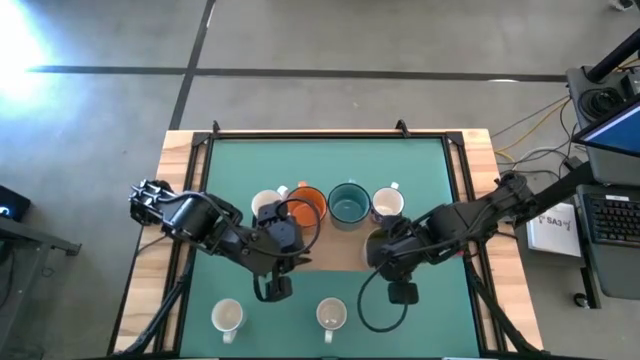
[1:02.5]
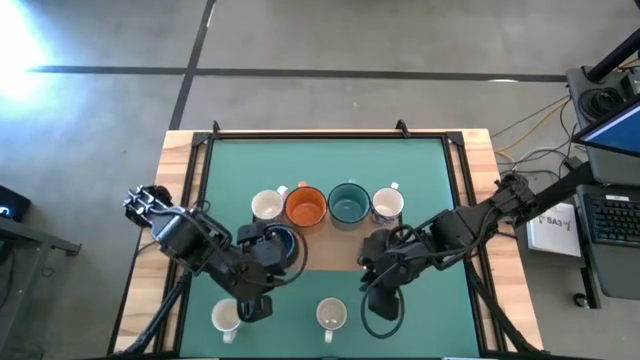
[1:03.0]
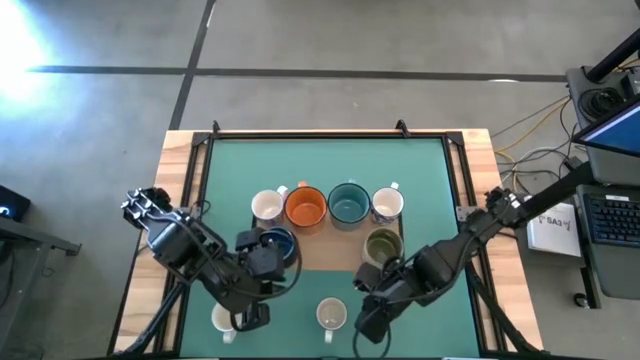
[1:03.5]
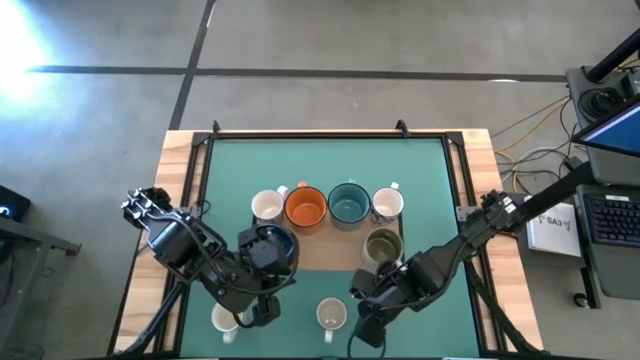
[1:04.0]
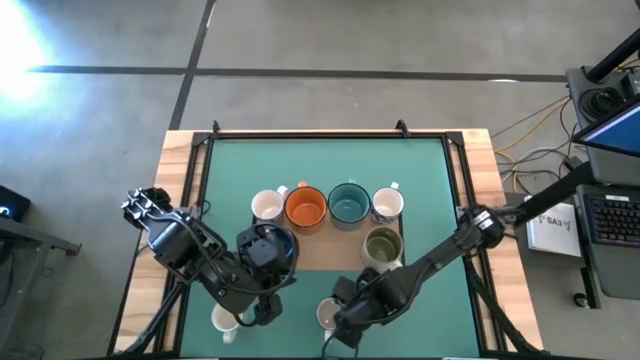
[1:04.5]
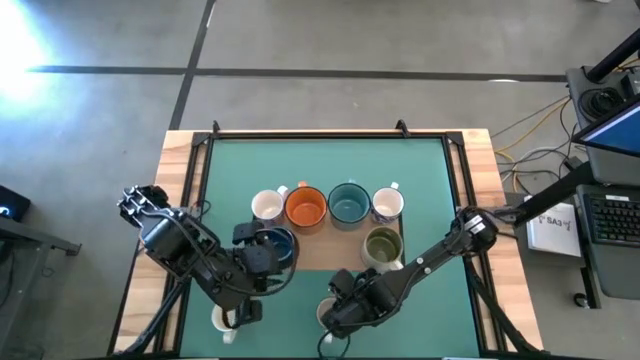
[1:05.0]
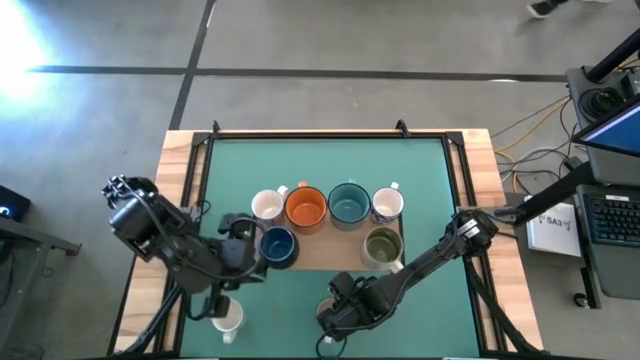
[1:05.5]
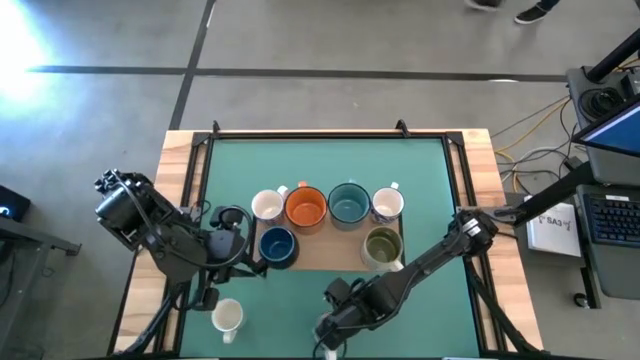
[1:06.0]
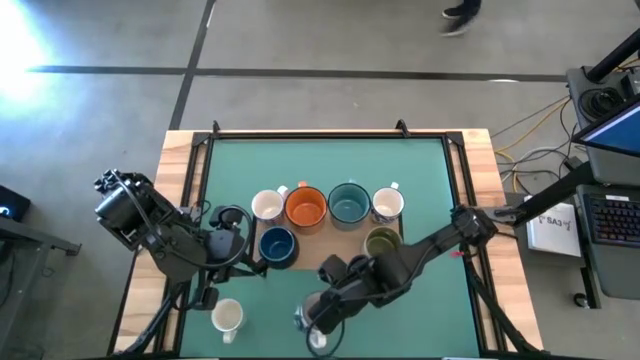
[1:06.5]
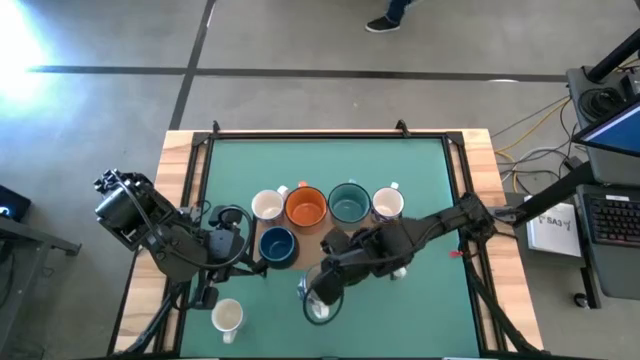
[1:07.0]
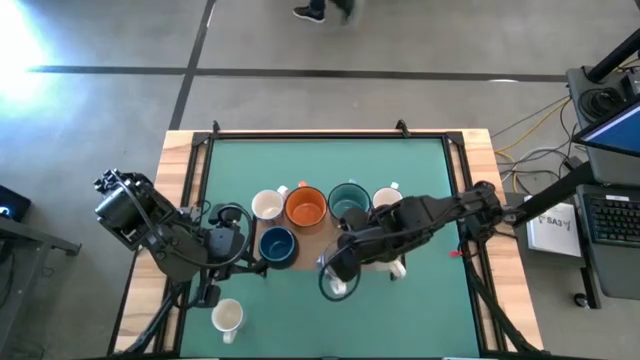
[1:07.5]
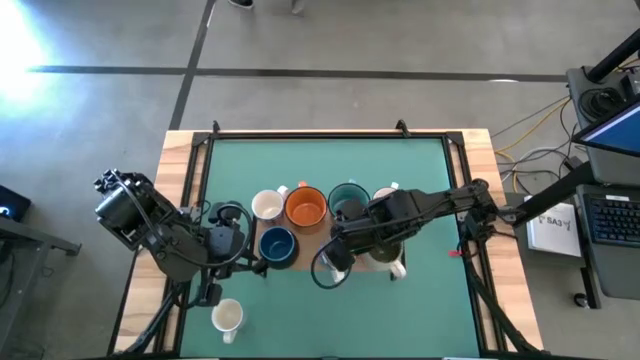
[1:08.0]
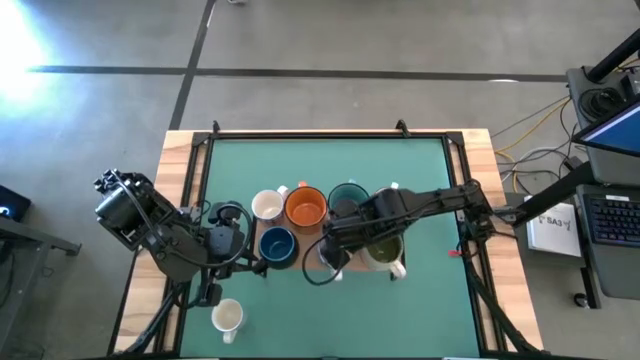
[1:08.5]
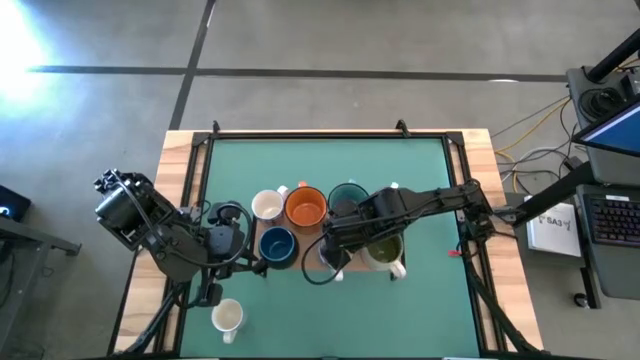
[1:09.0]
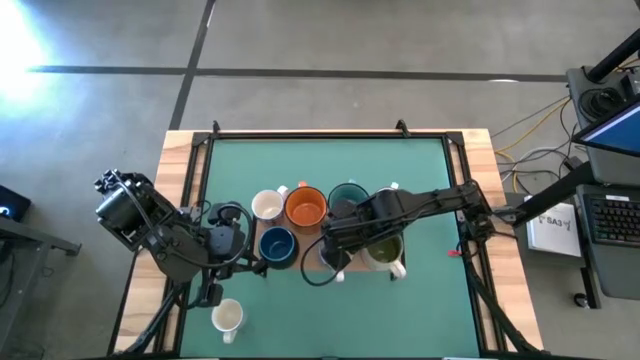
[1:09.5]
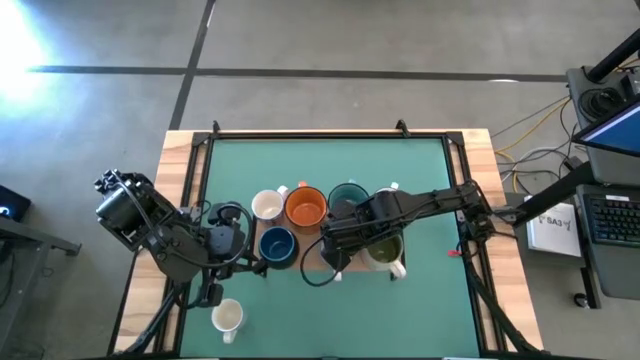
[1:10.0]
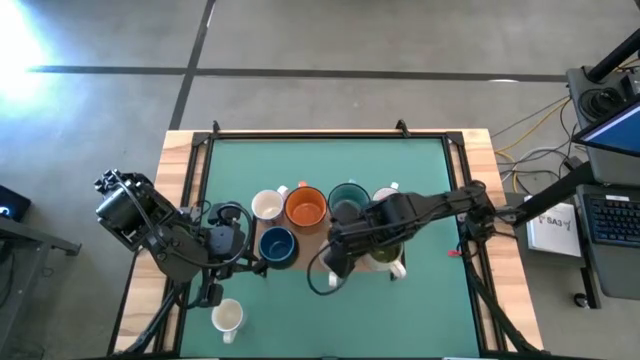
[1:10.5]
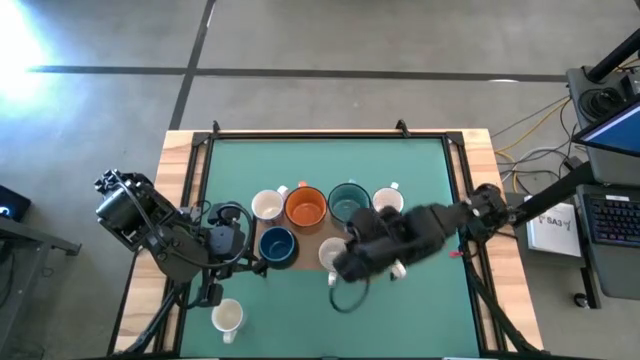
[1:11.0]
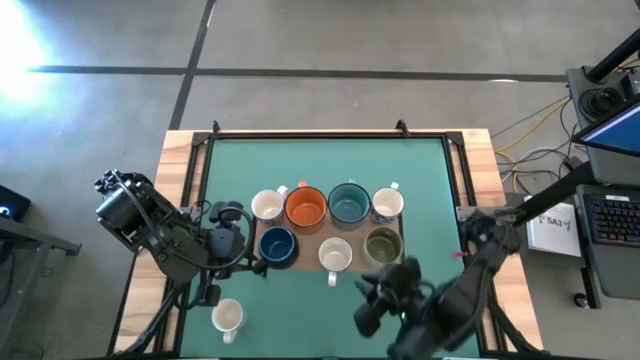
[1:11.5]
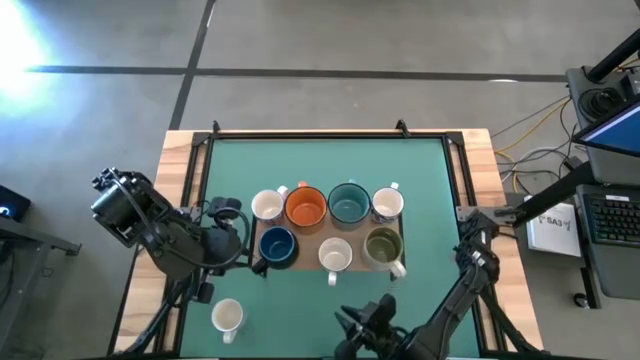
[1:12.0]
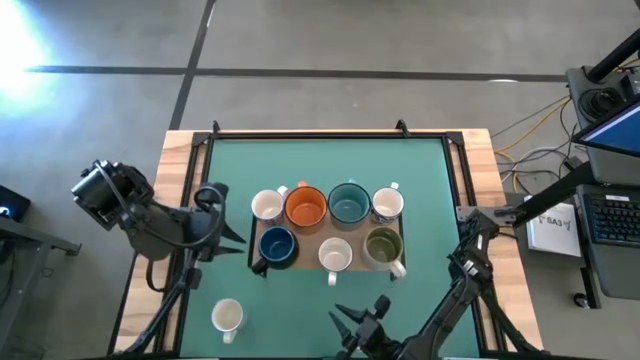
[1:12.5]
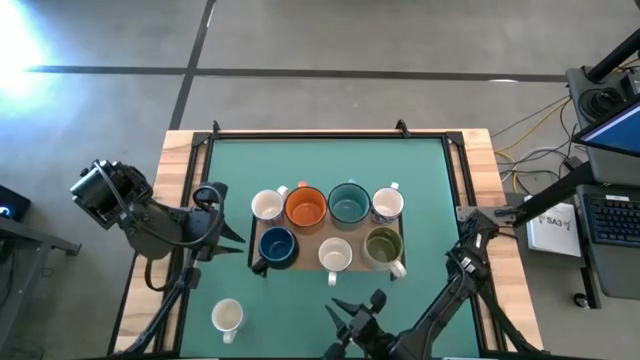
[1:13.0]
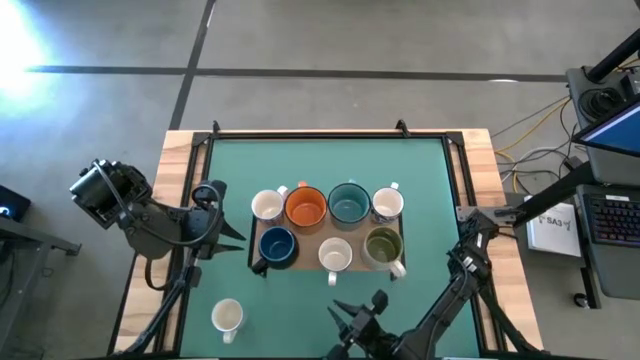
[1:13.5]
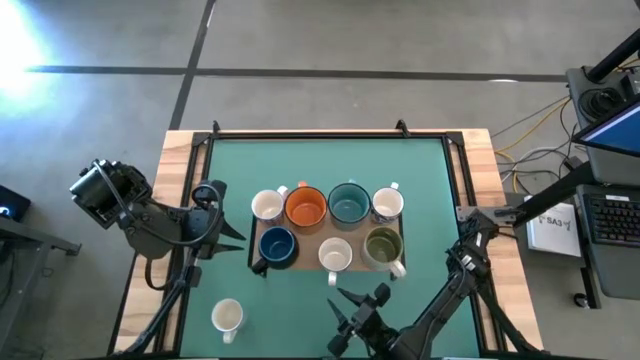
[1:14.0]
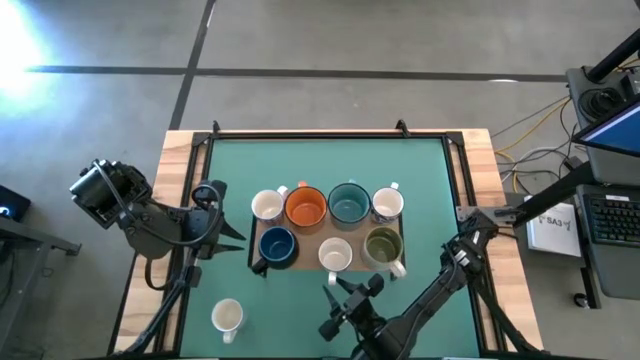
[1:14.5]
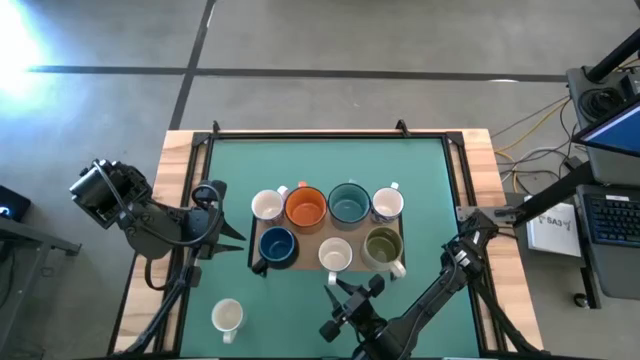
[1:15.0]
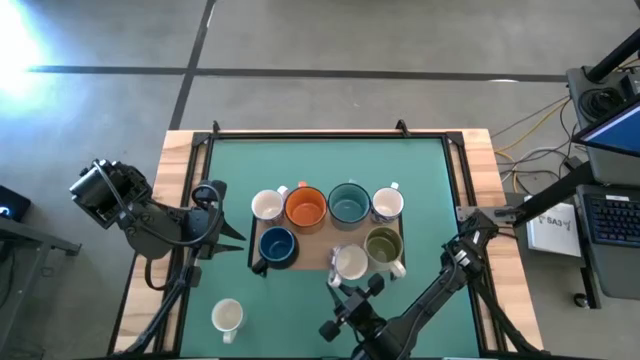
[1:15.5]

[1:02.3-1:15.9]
Task: Place coffee mugs
Put the blue patterned mug on the shelf

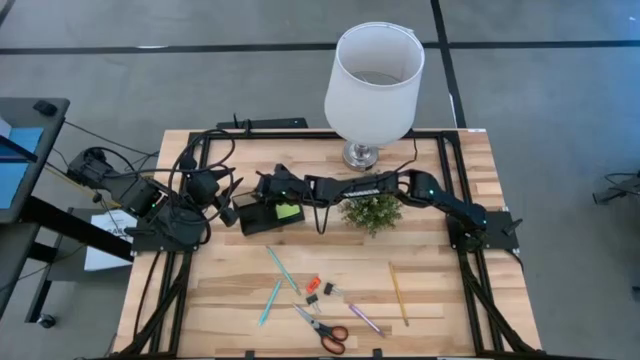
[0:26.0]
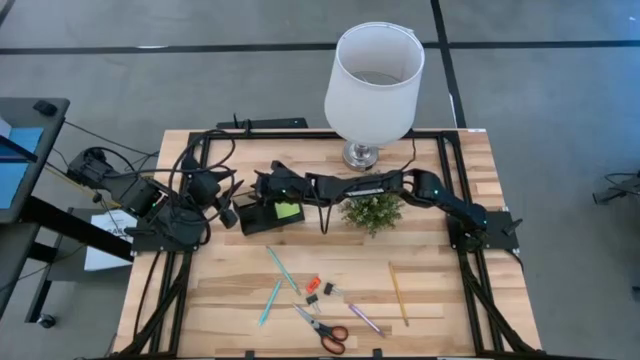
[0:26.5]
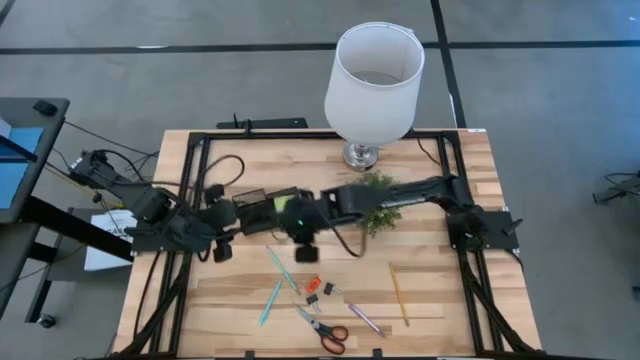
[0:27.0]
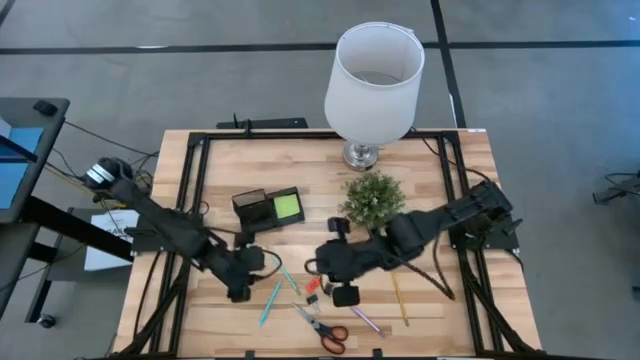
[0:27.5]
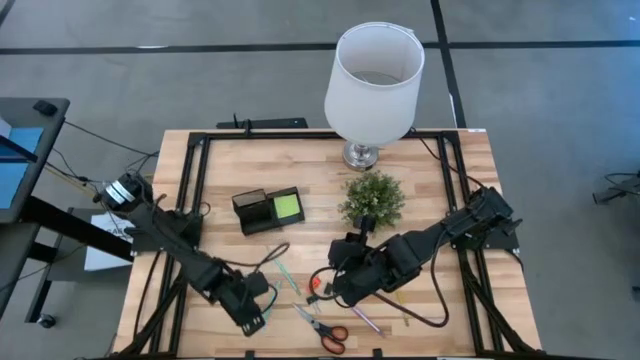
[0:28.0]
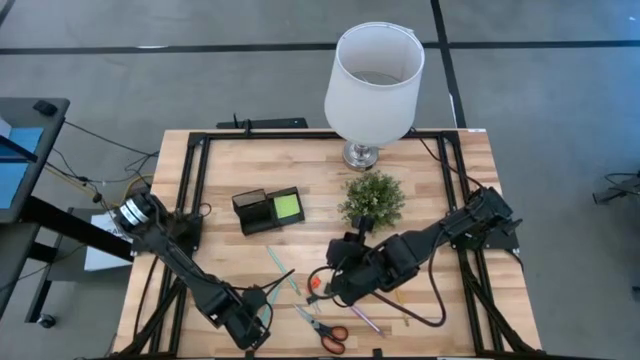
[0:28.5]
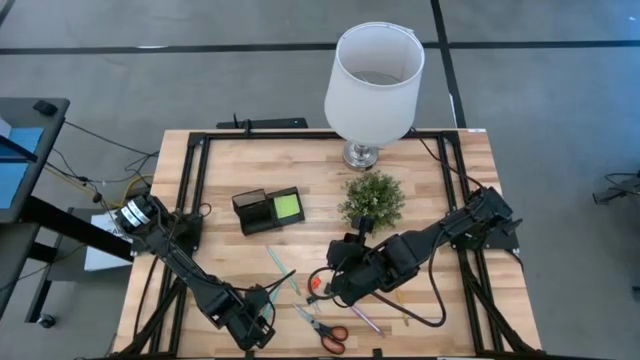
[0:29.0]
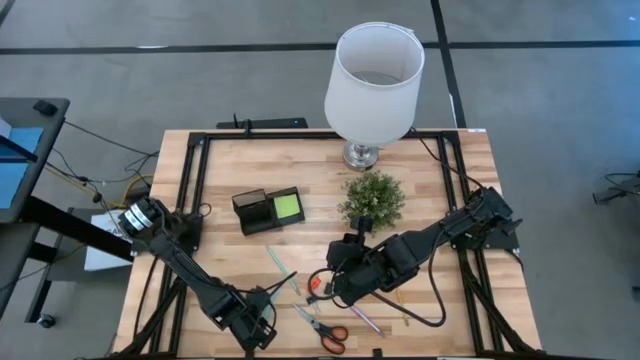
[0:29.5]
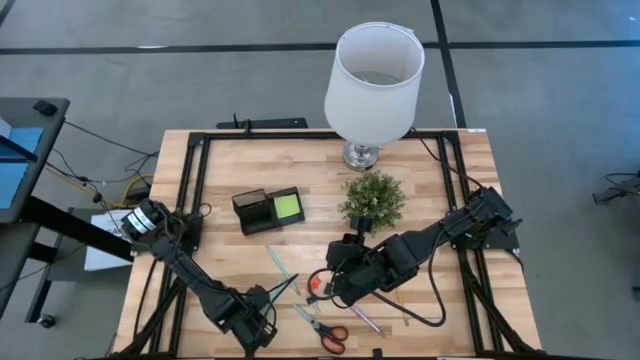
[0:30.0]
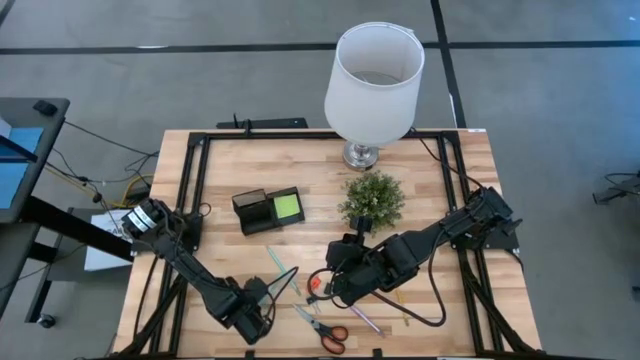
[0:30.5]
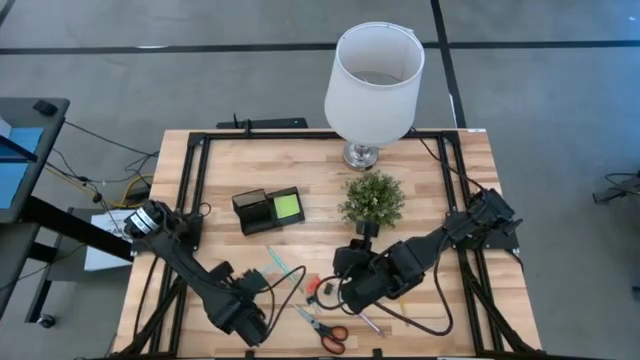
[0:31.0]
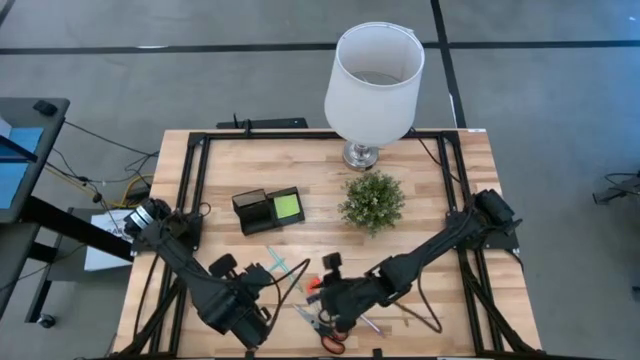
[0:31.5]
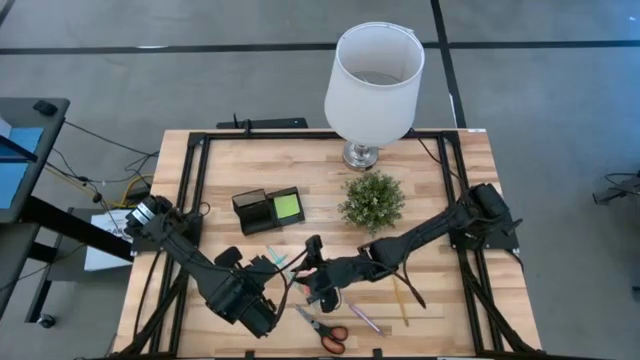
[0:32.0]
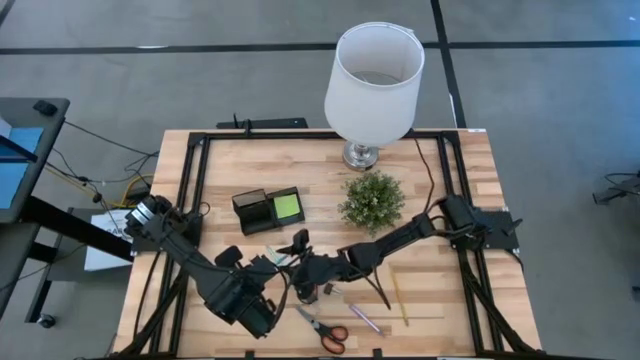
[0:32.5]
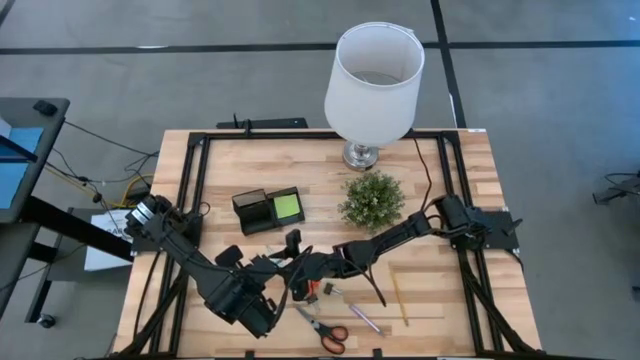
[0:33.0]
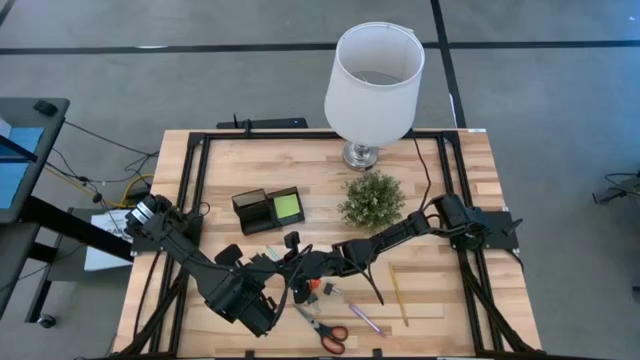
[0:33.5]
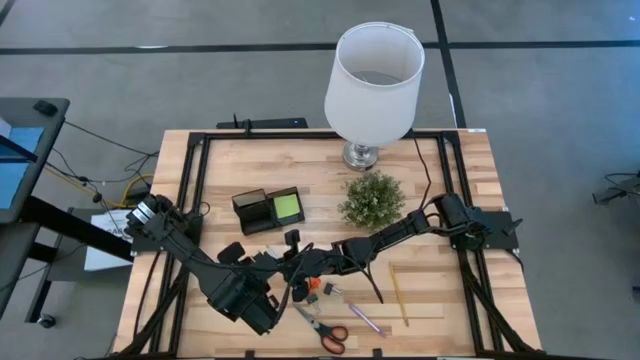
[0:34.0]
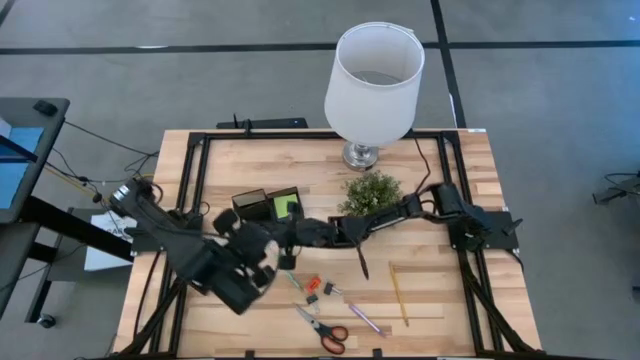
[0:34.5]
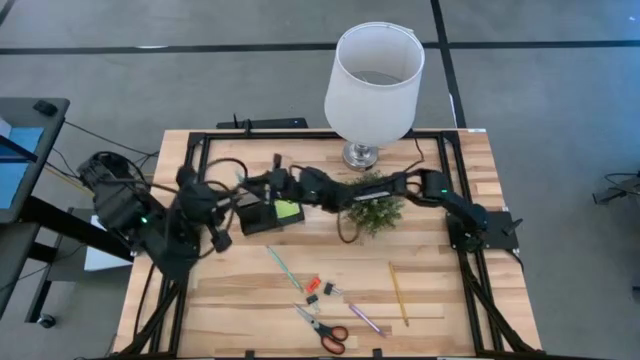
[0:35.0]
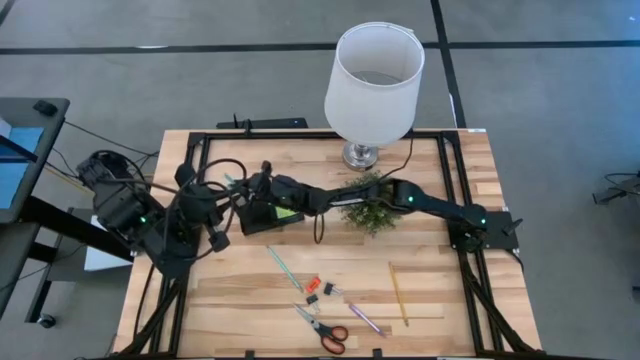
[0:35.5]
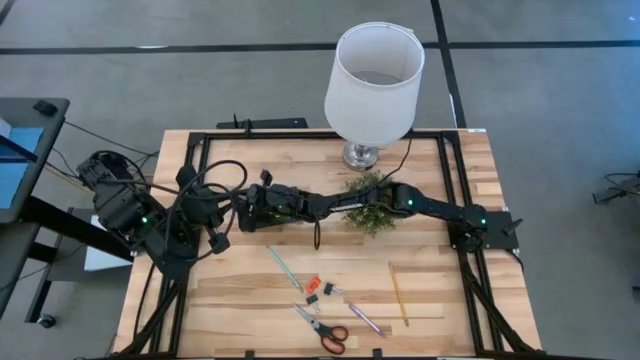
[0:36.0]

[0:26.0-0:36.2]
Task: Pick and place office supplies into organizer
Put the blue pen into the black desk organizer
